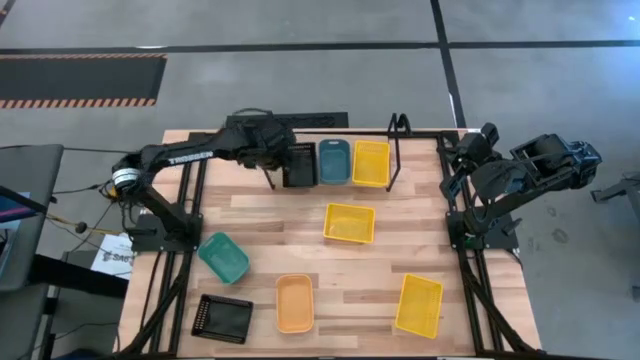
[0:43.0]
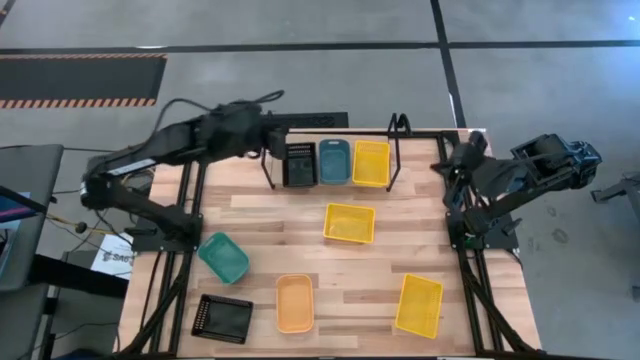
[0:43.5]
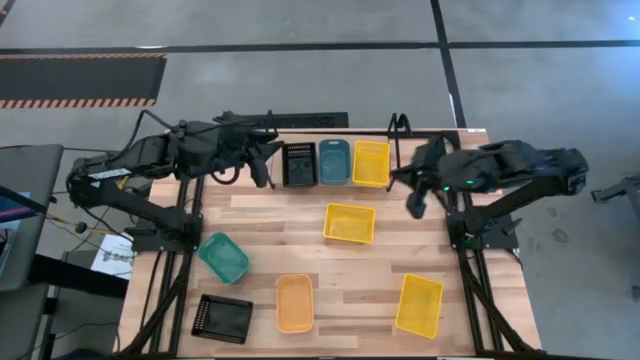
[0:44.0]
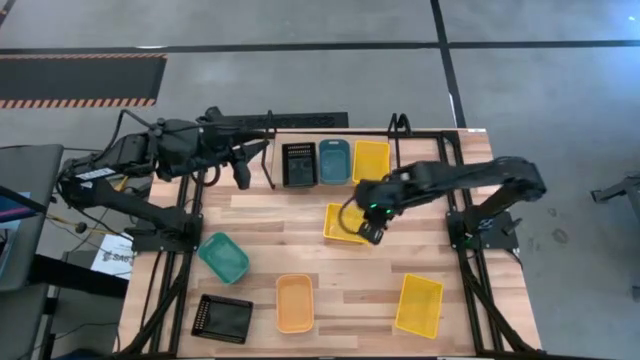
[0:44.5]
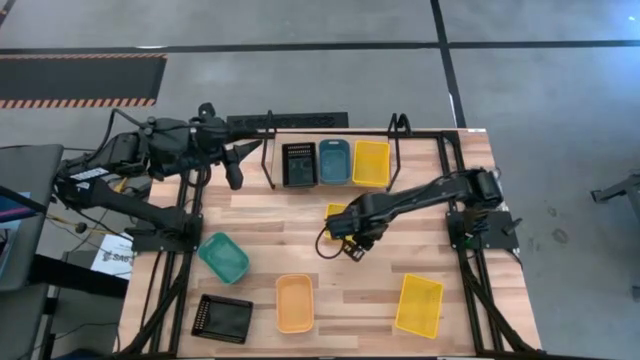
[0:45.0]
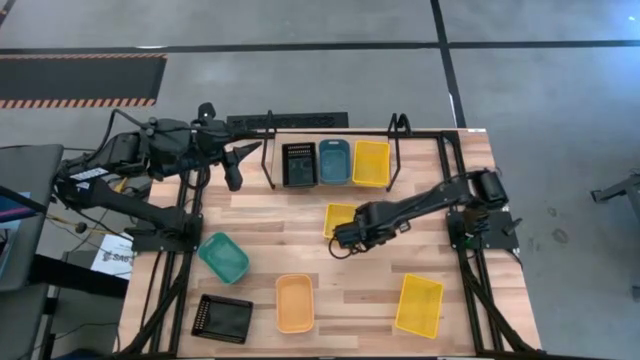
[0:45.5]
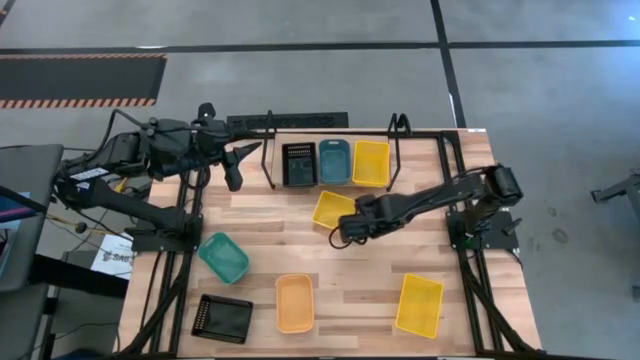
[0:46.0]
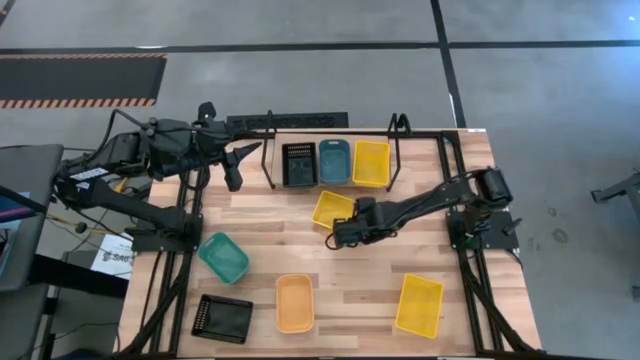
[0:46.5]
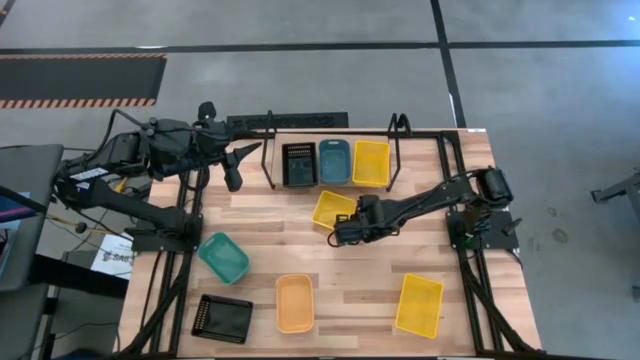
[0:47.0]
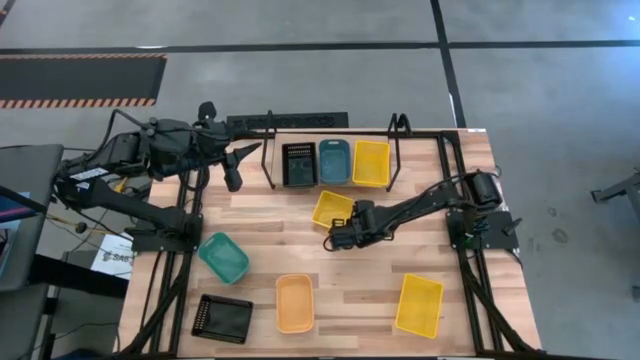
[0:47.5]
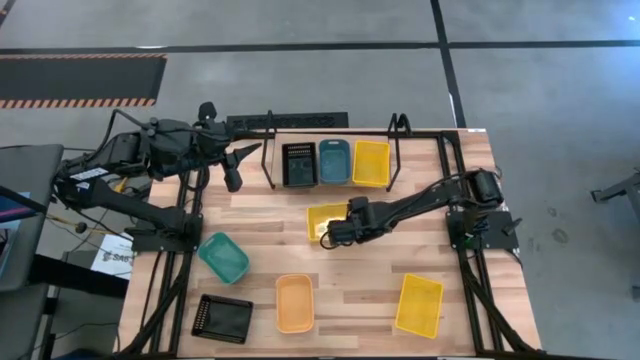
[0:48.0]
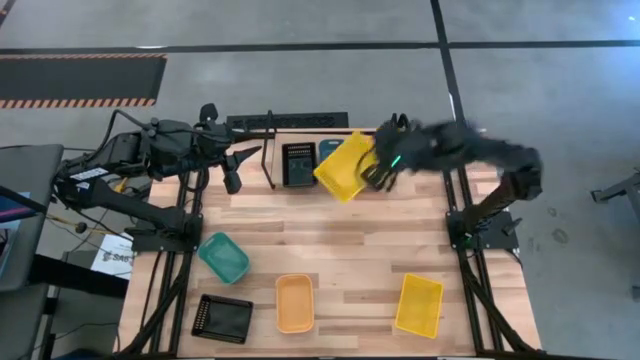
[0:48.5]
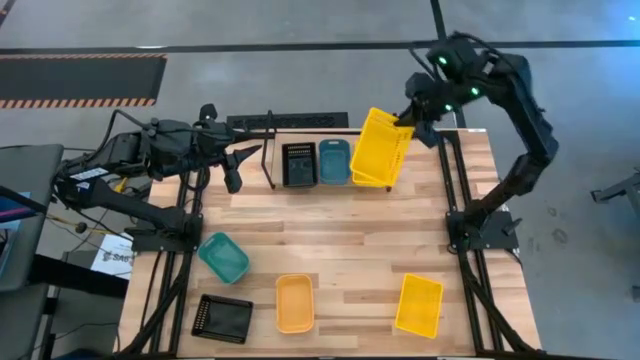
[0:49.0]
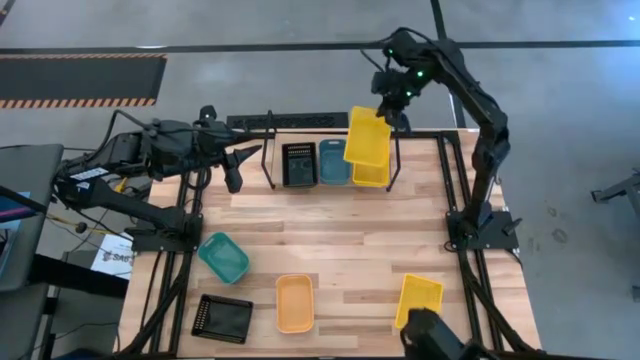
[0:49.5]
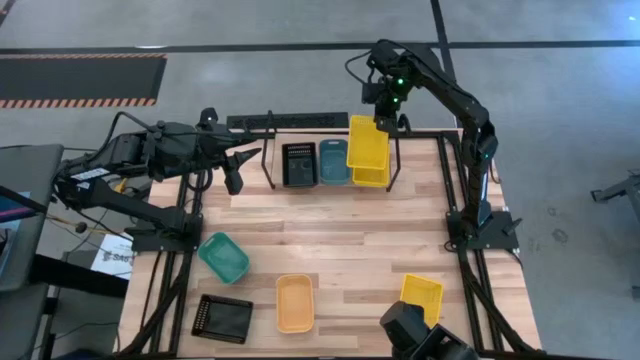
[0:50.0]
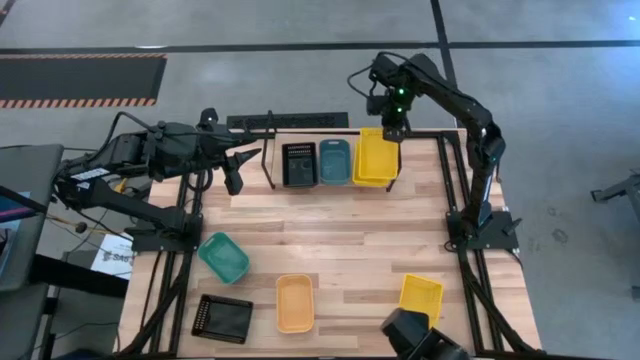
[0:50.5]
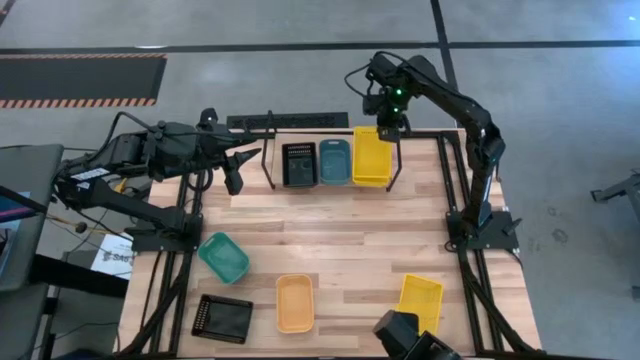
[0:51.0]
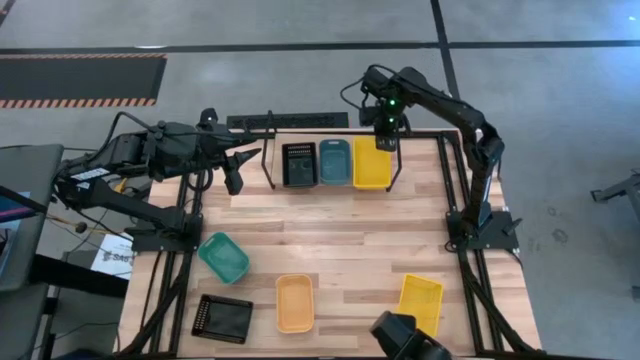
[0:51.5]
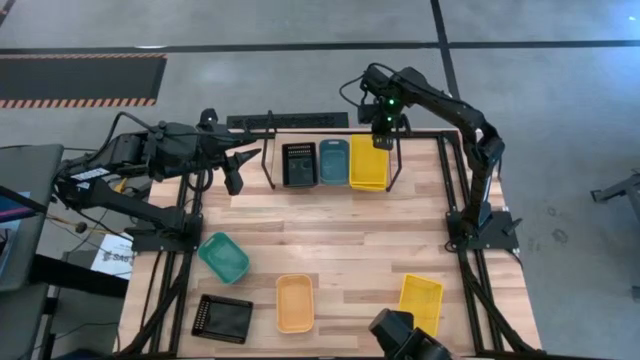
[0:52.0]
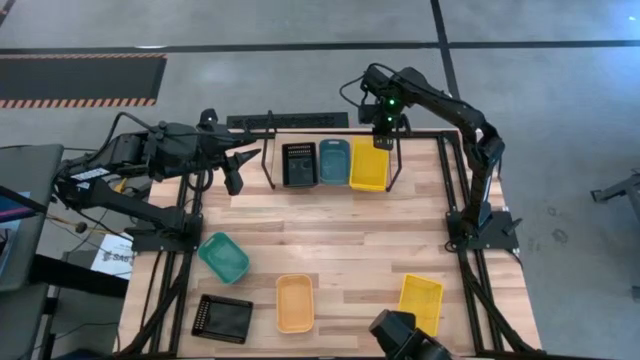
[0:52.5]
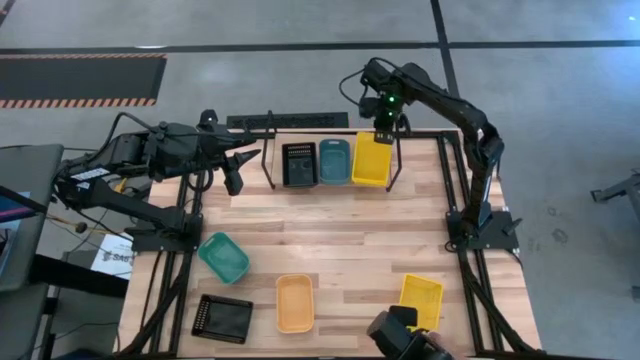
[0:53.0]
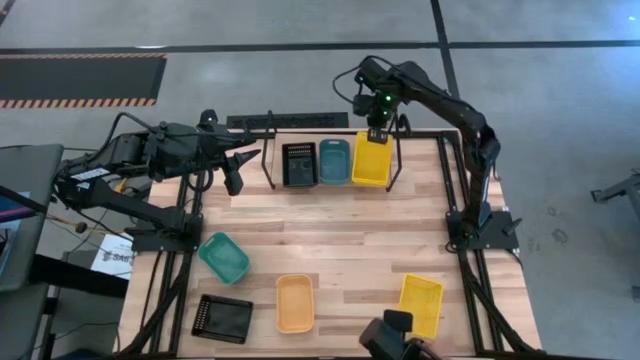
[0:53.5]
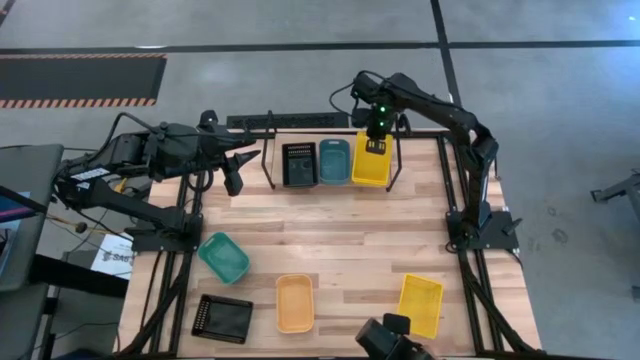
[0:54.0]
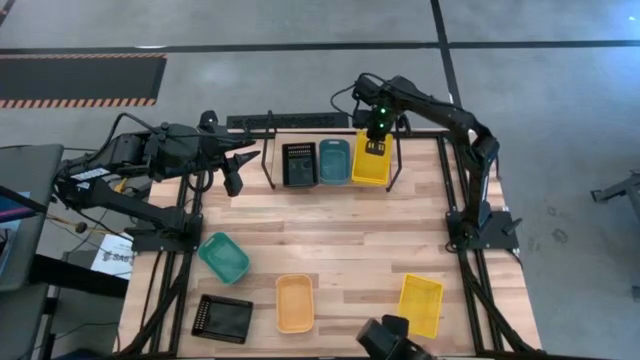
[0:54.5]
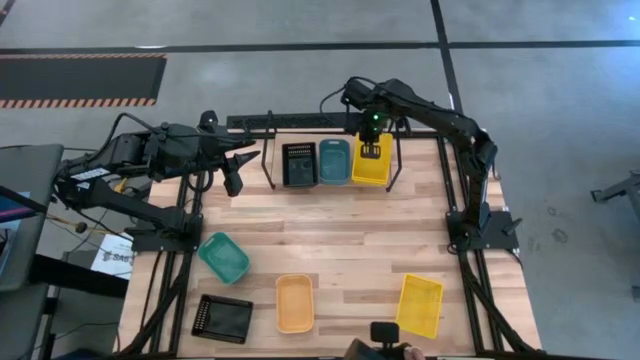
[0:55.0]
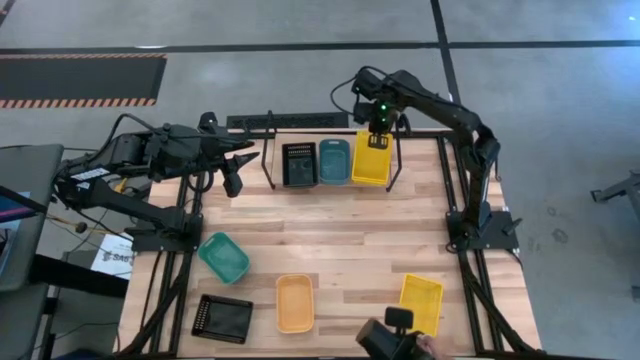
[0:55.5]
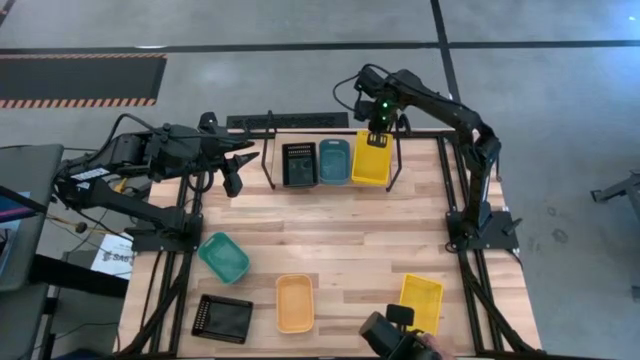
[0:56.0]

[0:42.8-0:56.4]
Task: Stack baskets on shelf by color
Stack the top yellow bin on the yellow bin

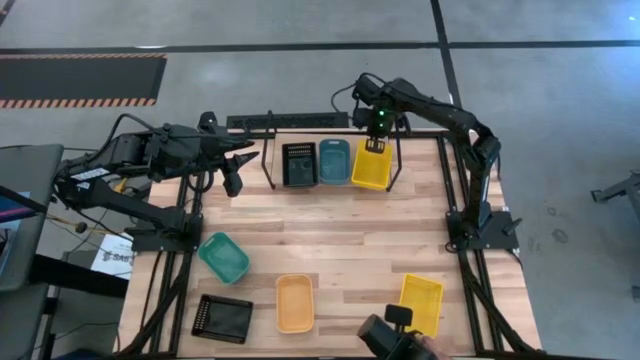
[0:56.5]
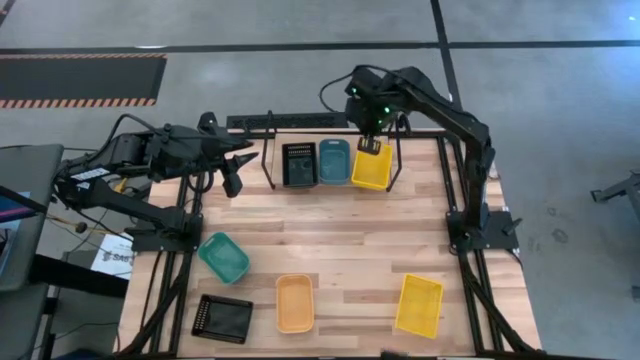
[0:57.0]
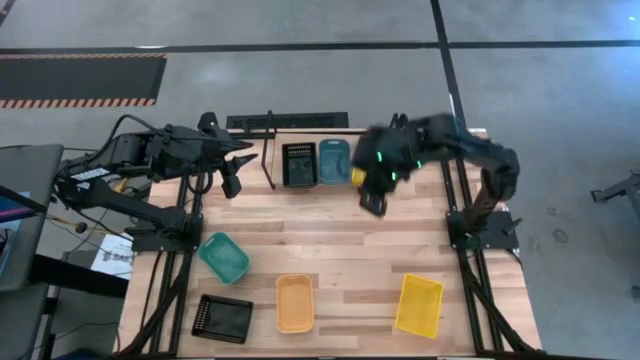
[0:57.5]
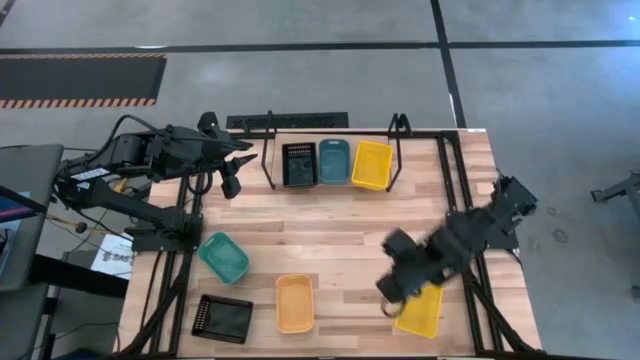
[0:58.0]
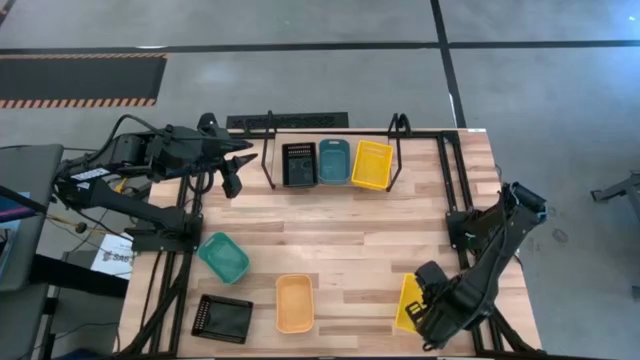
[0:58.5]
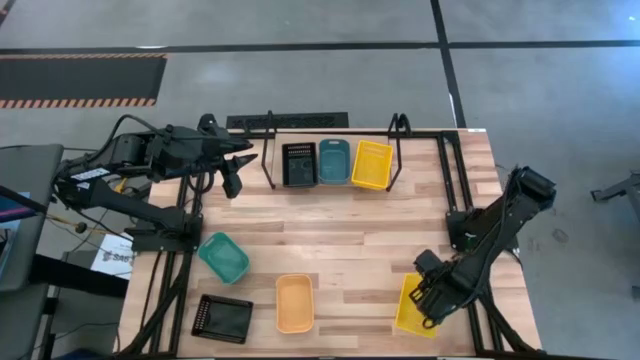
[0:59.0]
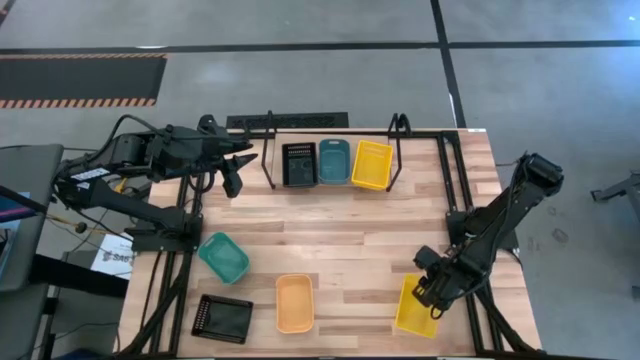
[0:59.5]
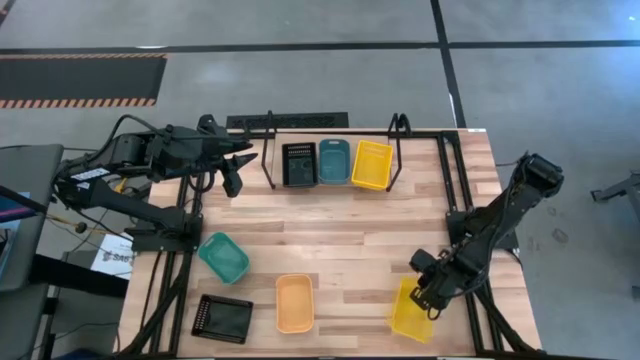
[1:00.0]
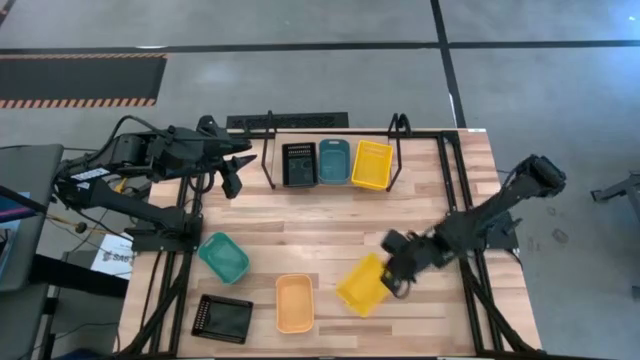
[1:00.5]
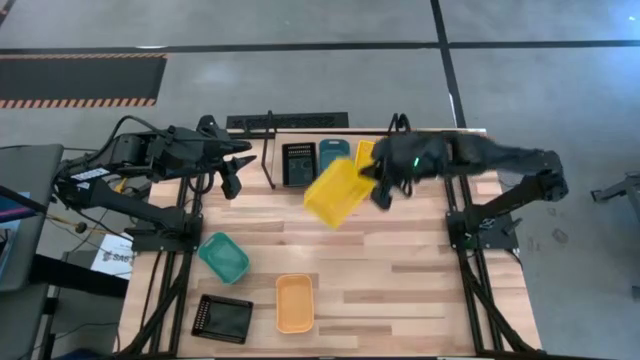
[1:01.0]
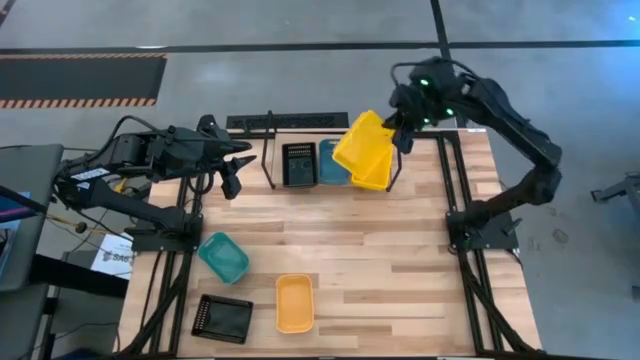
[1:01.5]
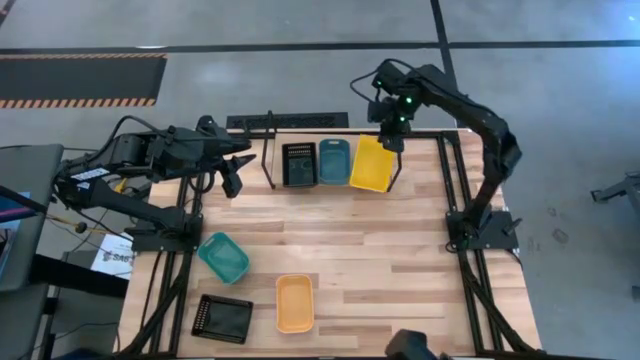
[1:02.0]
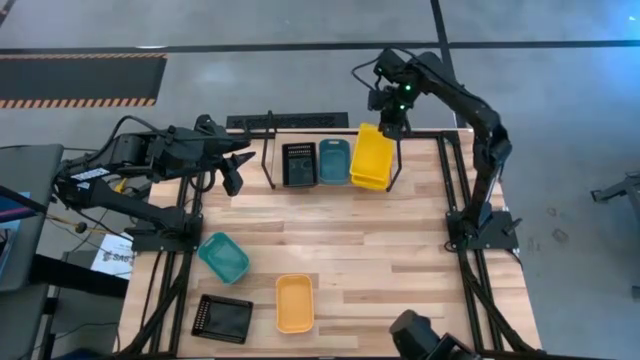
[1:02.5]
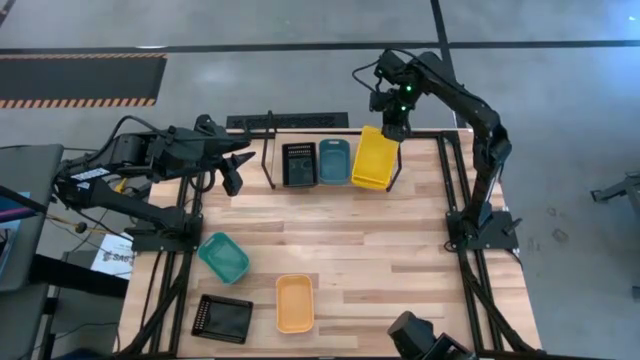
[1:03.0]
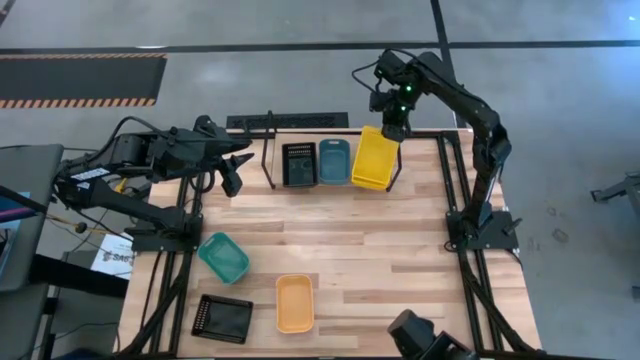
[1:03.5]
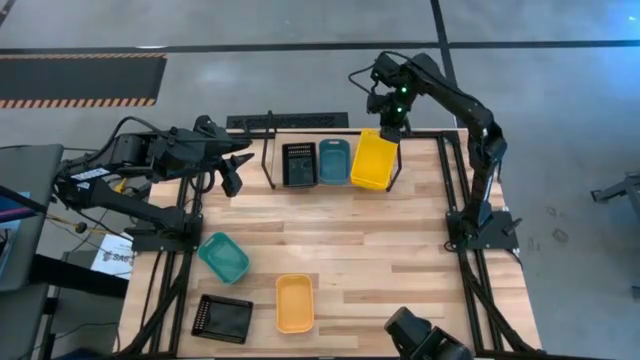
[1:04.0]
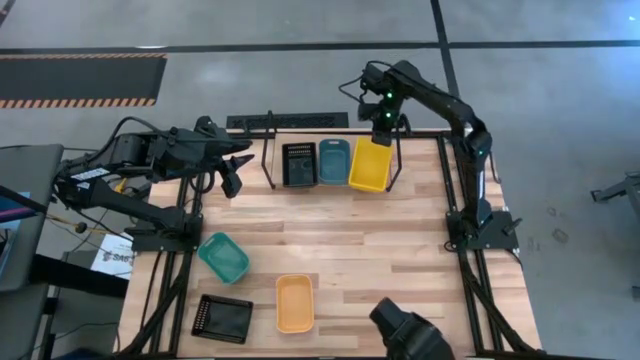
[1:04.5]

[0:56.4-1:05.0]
Stack the yellow bin on the yellow bin
